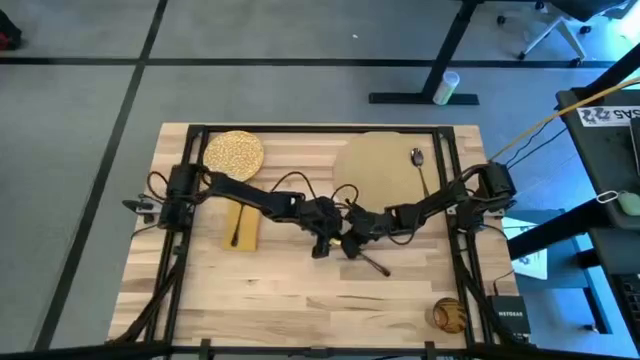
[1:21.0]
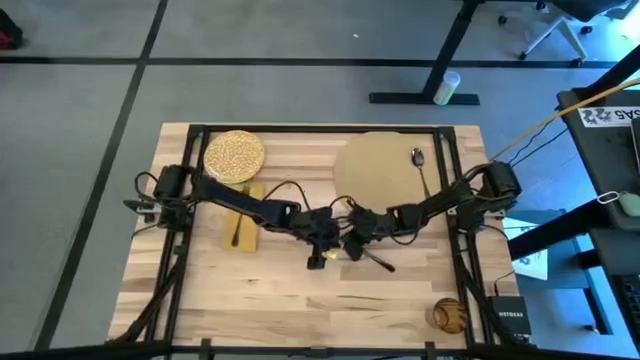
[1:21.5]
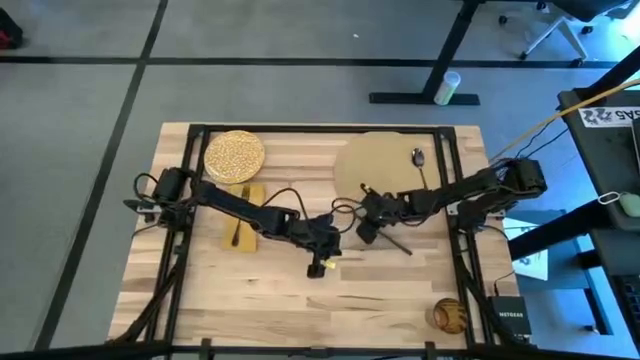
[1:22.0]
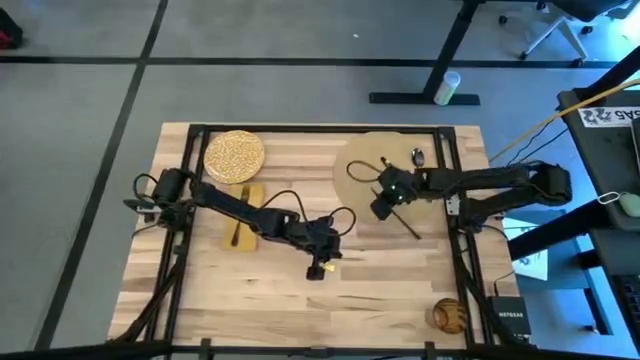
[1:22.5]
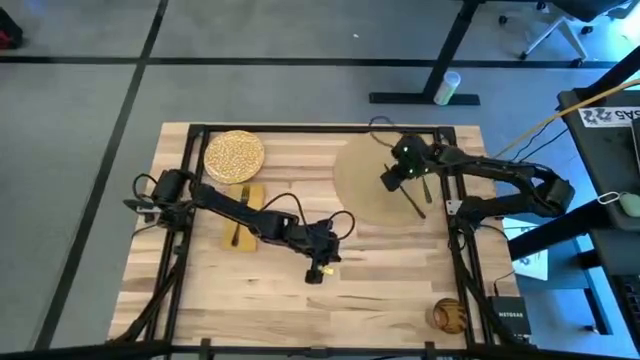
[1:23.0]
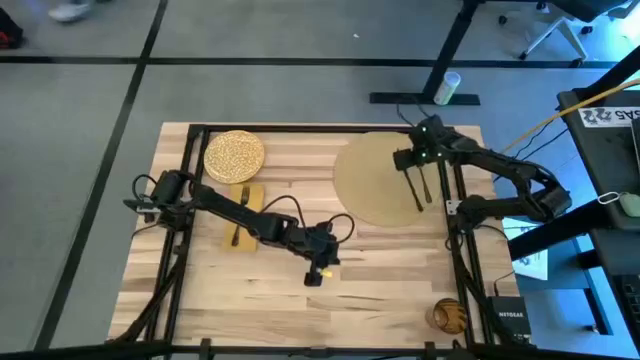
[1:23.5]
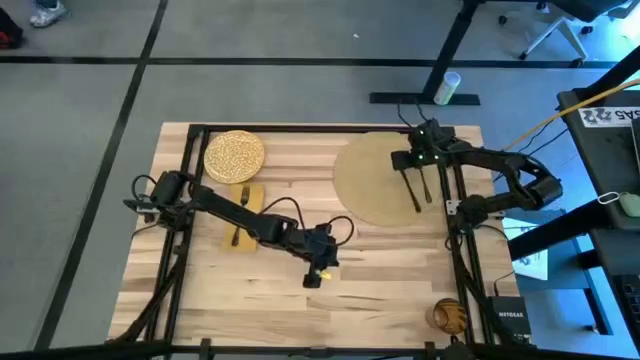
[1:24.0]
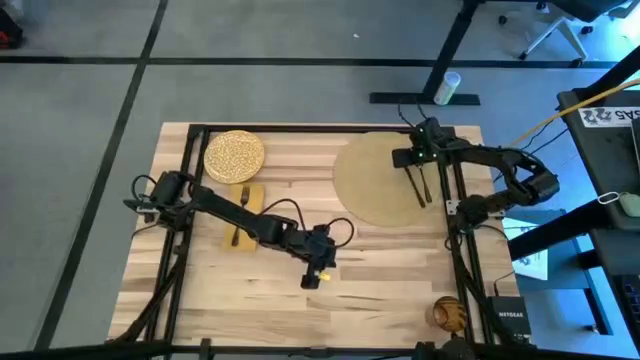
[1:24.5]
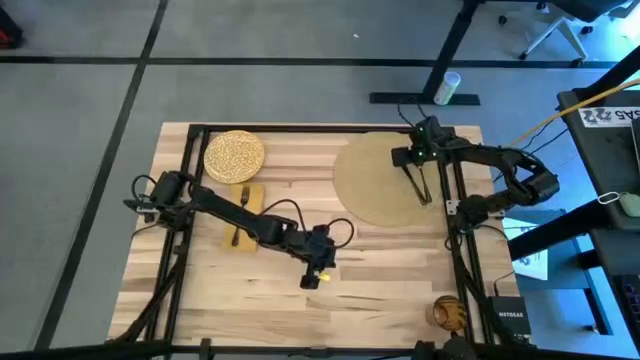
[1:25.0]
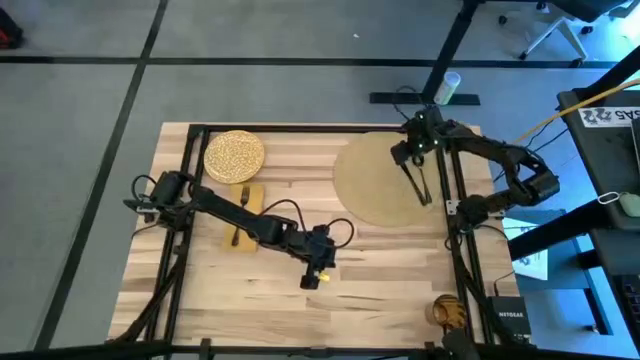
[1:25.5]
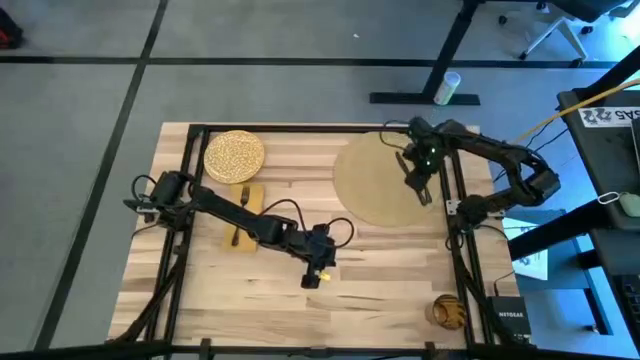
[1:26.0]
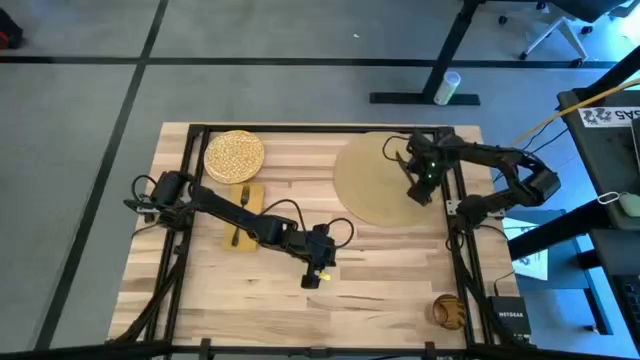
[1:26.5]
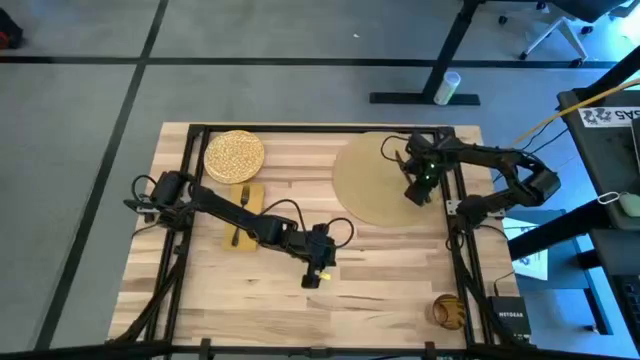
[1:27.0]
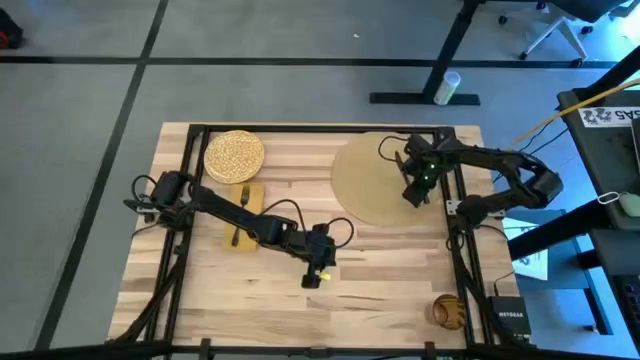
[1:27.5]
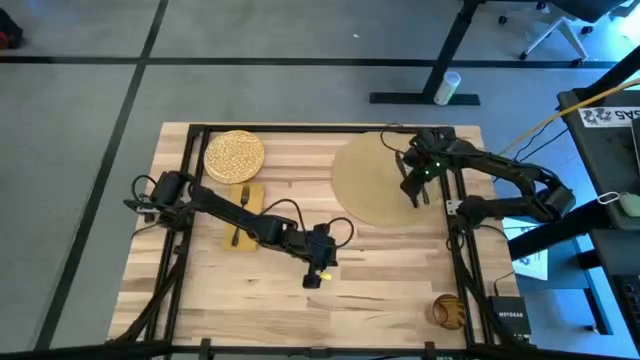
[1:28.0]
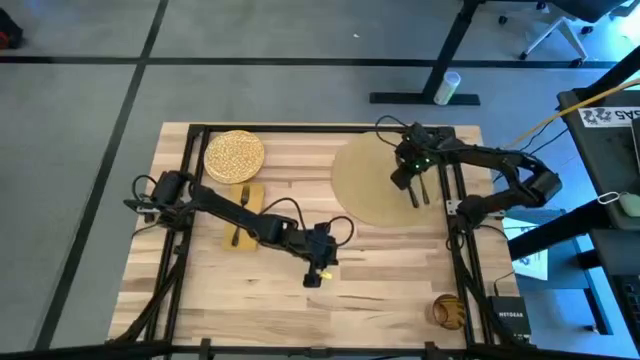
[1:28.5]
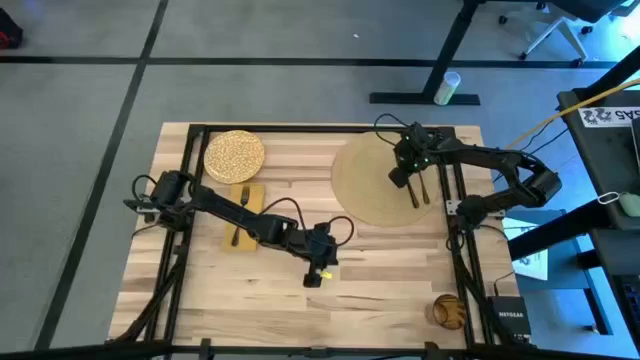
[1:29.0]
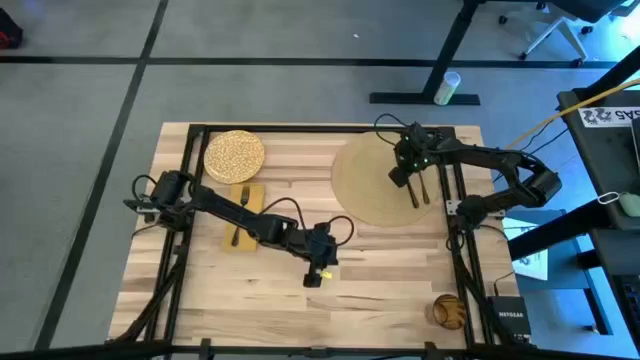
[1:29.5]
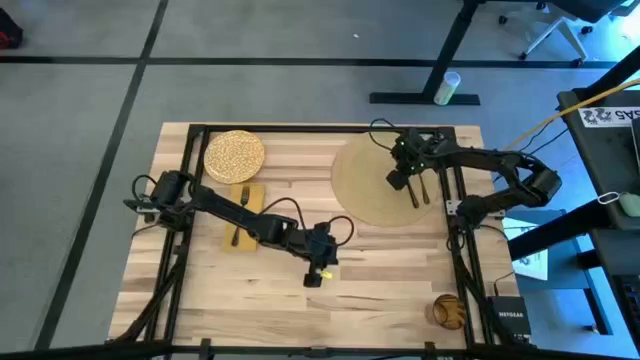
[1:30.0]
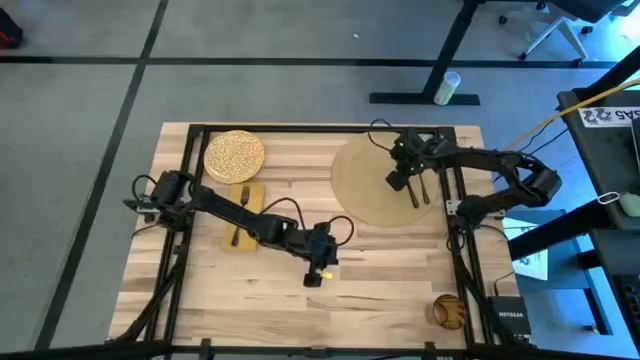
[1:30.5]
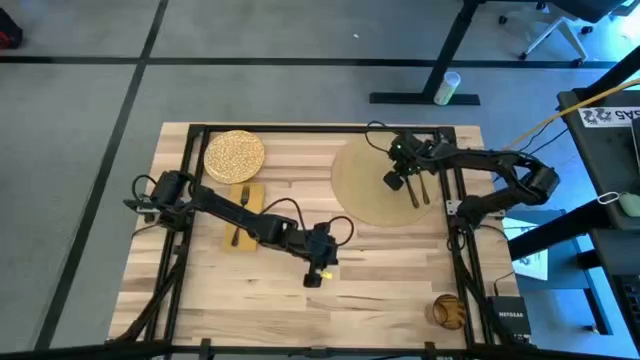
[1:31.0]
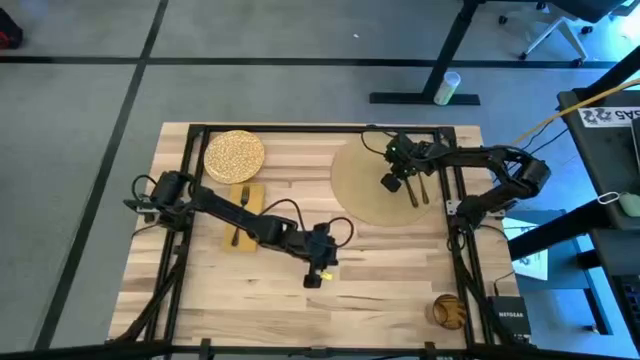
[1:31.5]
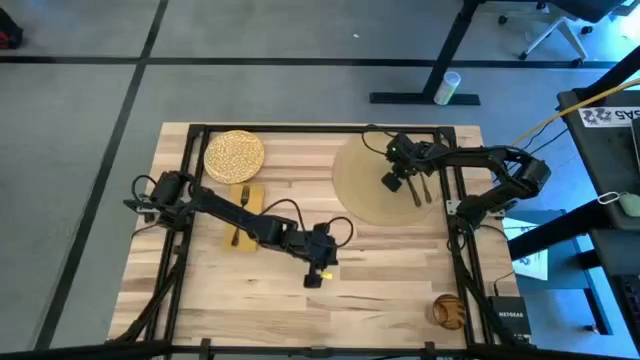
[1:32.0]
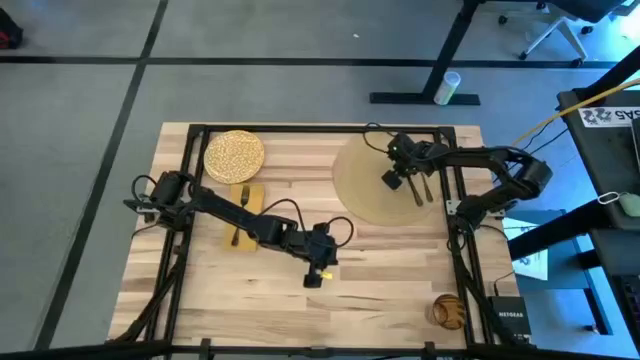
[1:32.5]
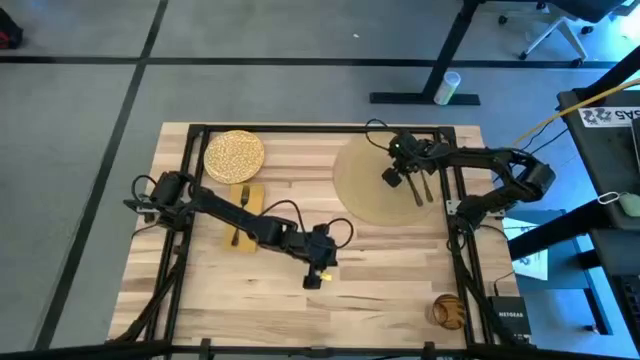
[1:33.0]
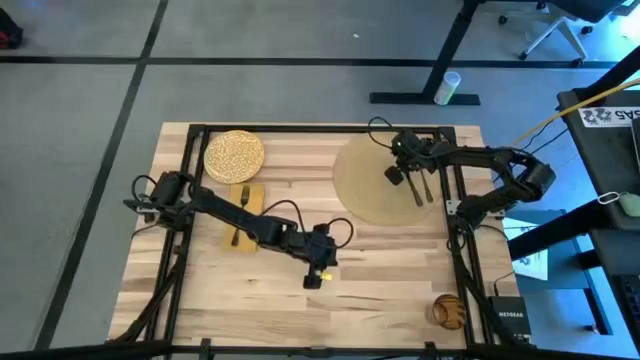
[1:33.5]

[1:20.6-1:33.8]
Task: Set table place
Put the knife to the left of the spoon on the woven mat

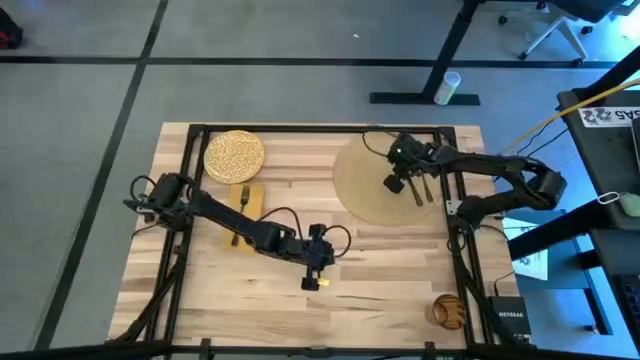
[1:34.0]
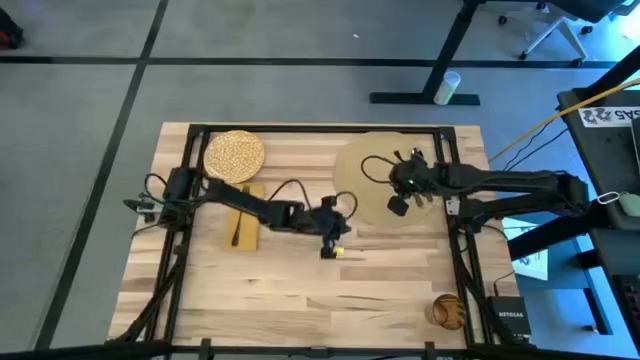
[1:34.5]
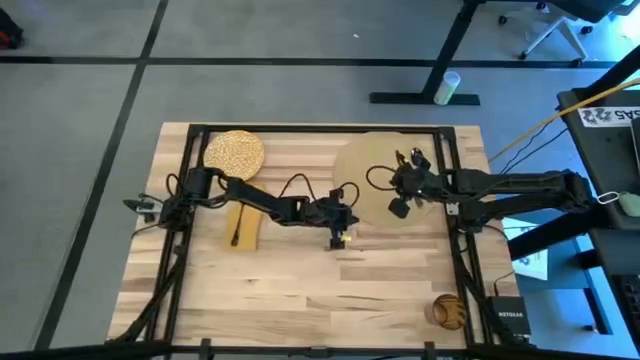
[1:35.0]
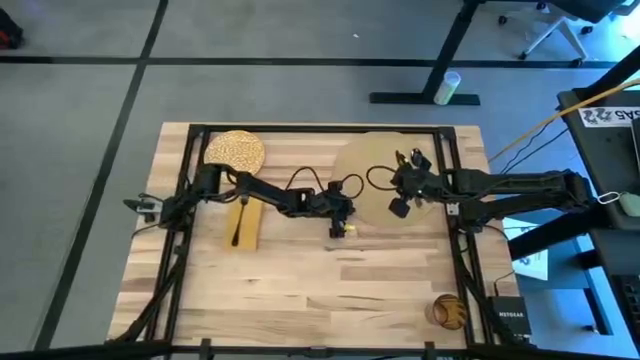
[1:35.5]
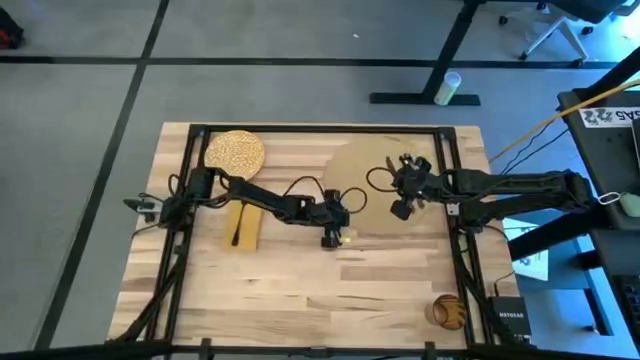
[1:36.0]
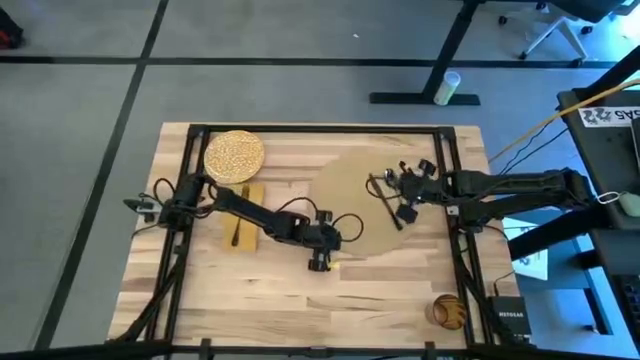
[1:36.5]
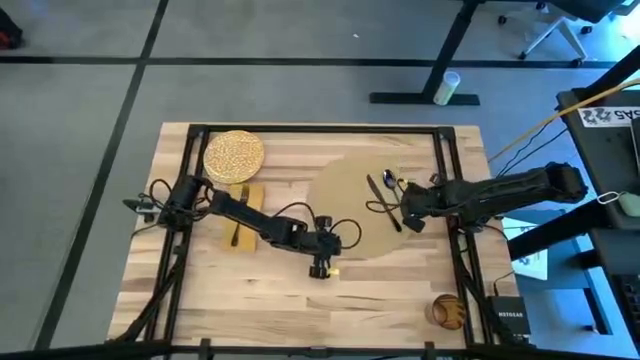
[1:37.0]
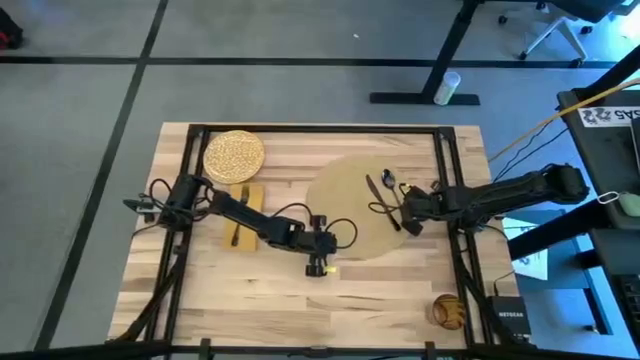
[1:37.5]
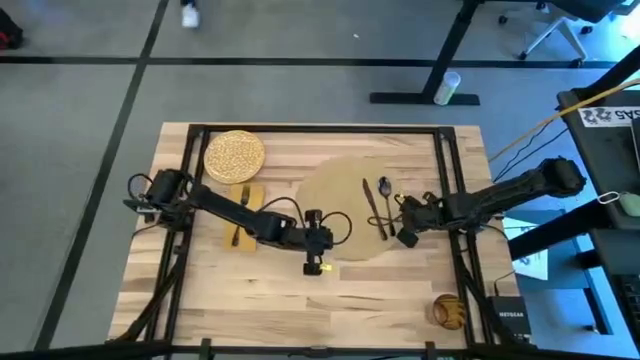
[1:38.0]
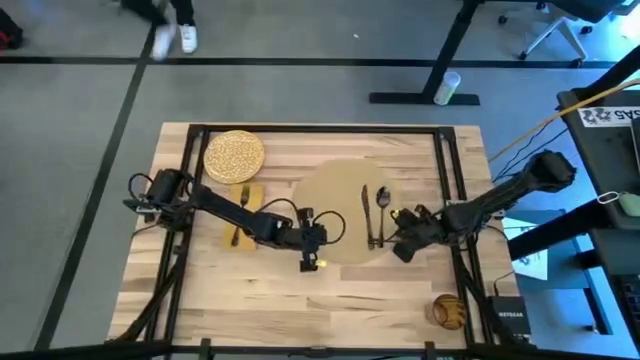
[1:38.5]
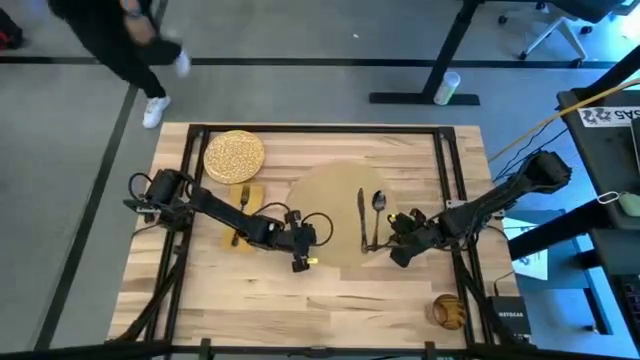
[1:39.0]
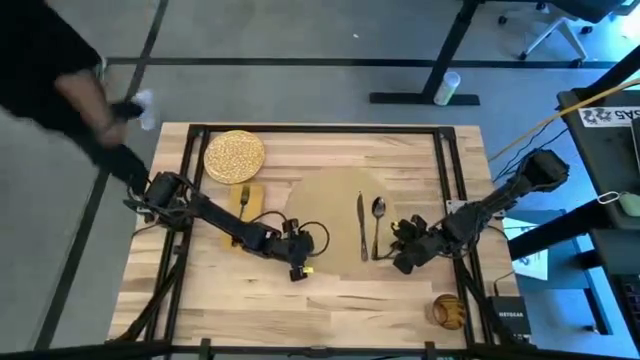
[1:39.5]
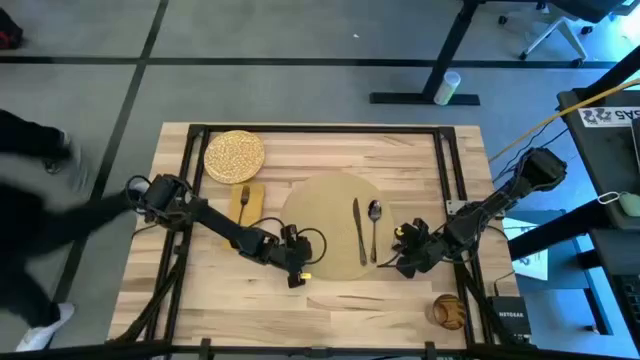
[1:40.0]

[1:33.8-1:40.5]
Move the woven mat to the center of the table

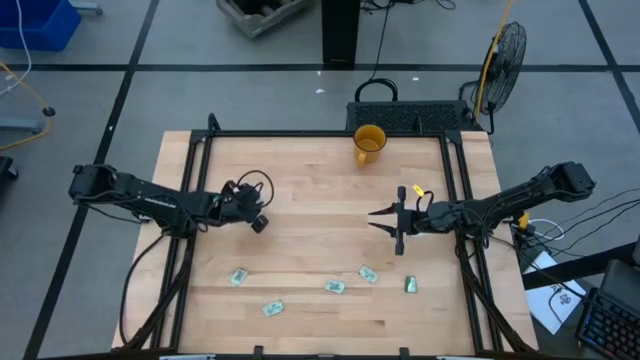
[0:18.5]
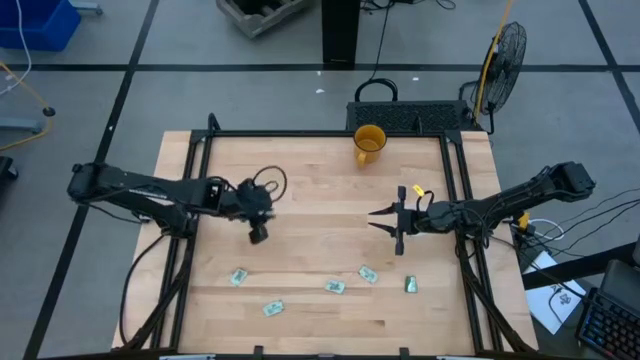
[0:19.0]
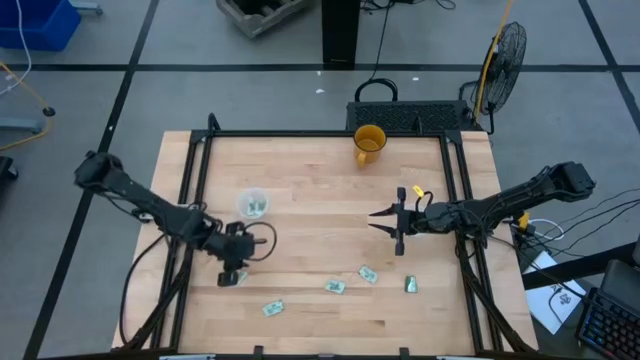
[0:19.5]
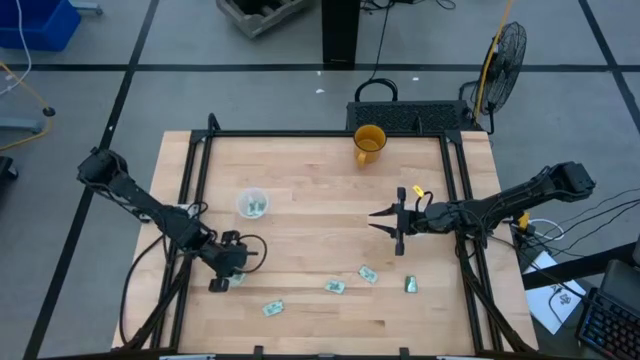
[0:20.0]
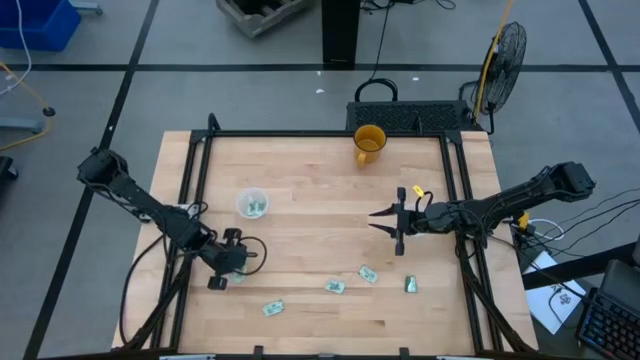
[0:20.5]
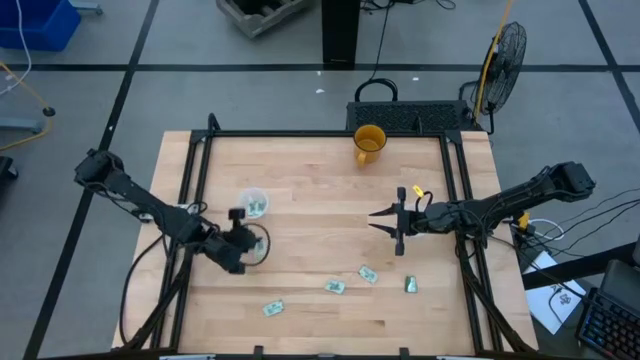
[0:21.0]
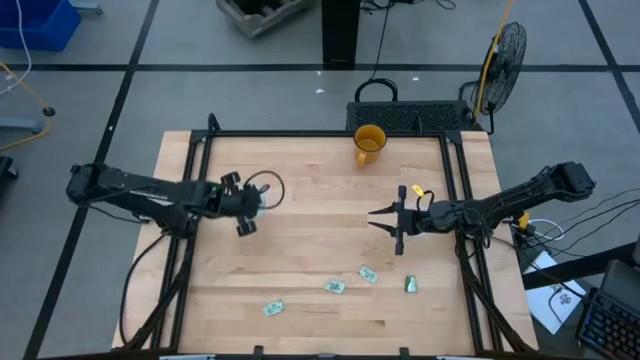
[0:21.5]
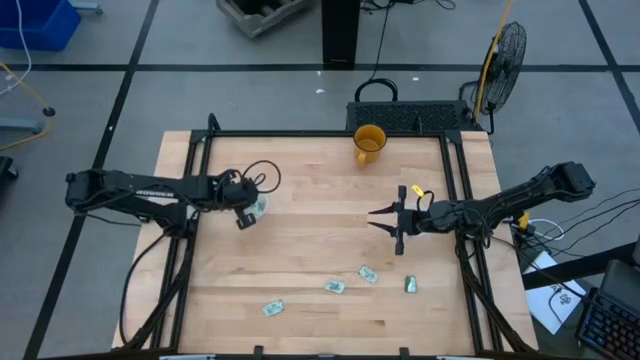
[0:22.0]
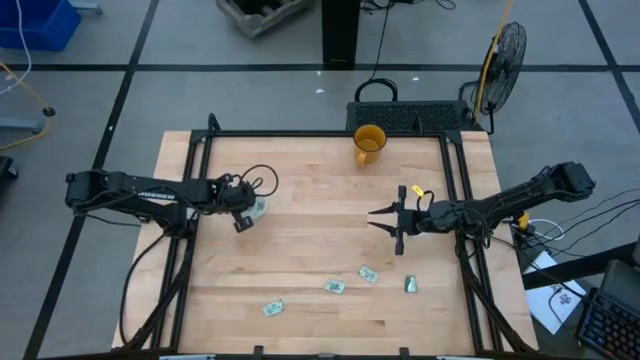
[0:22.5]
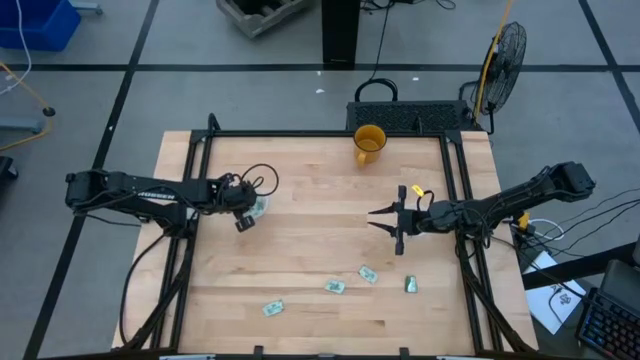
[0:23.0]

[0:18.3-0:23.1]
Task: Pick and place Stevia / Truvia into bins
Put the stevia packet into the left transparent container
